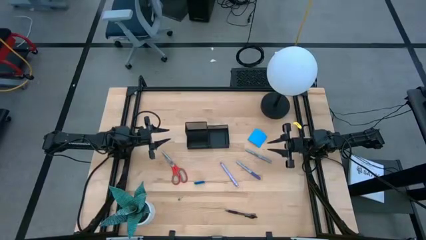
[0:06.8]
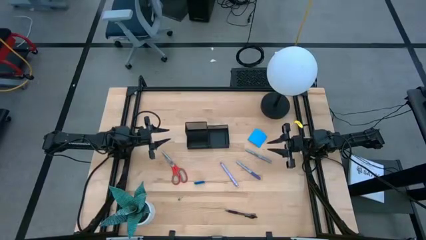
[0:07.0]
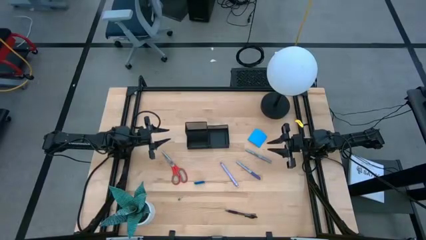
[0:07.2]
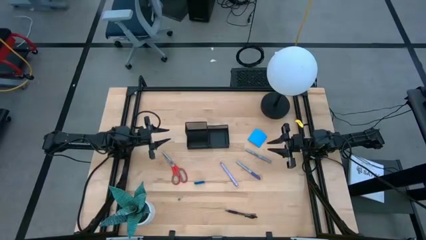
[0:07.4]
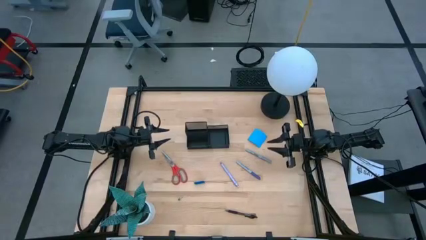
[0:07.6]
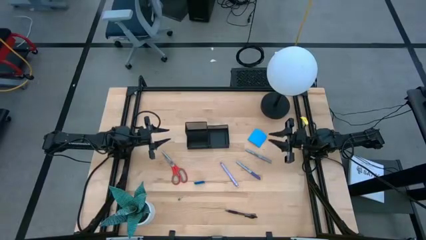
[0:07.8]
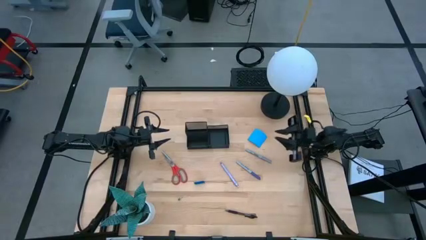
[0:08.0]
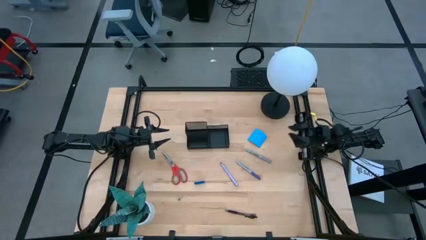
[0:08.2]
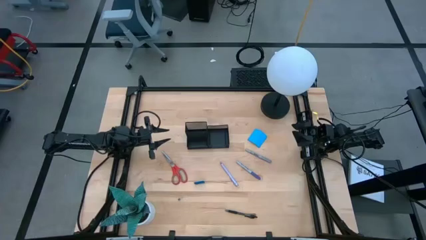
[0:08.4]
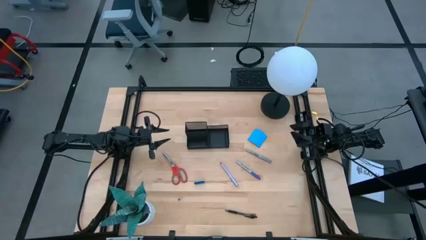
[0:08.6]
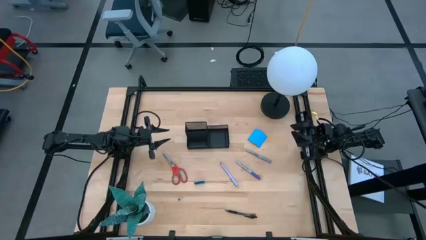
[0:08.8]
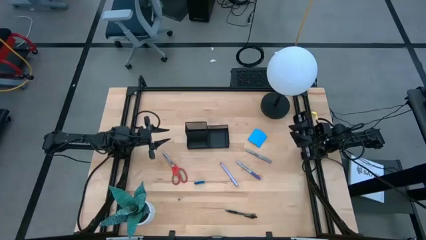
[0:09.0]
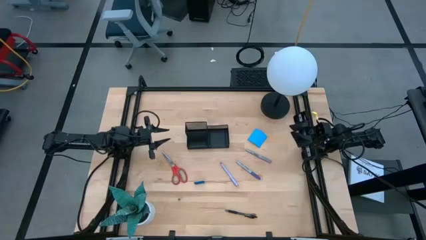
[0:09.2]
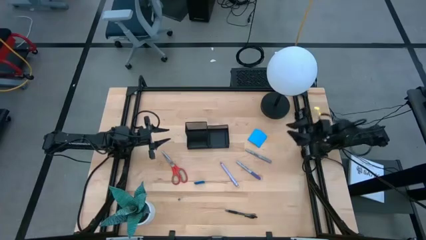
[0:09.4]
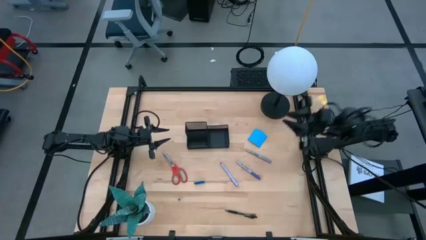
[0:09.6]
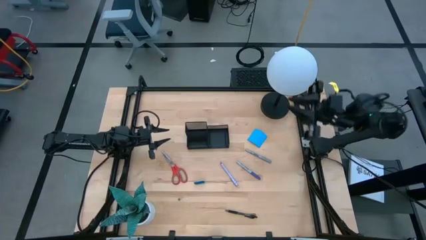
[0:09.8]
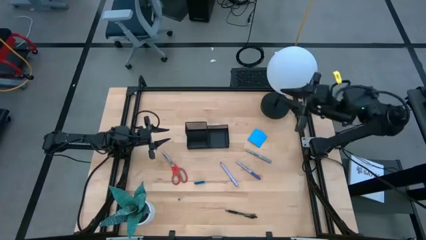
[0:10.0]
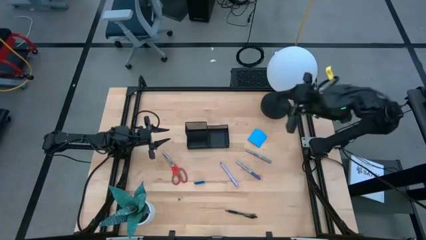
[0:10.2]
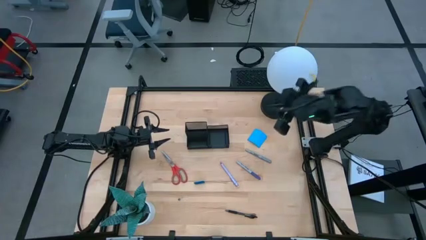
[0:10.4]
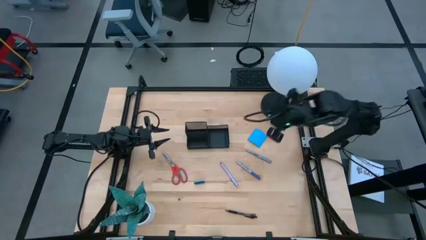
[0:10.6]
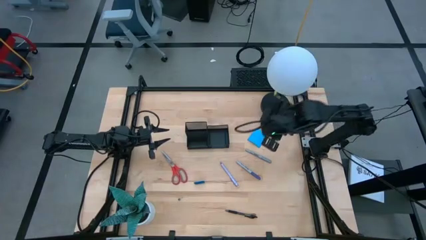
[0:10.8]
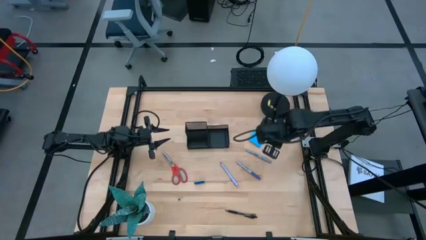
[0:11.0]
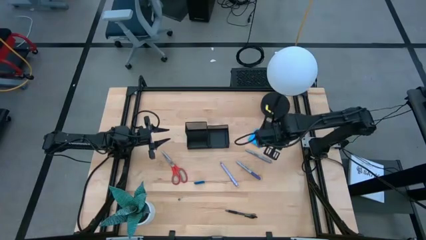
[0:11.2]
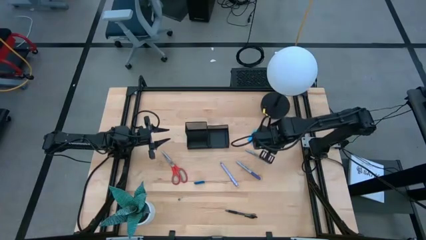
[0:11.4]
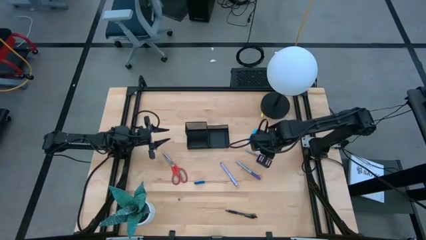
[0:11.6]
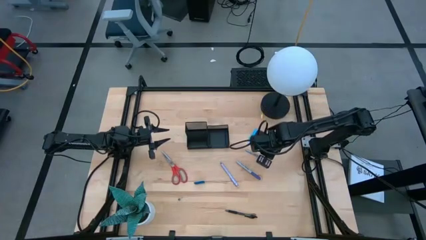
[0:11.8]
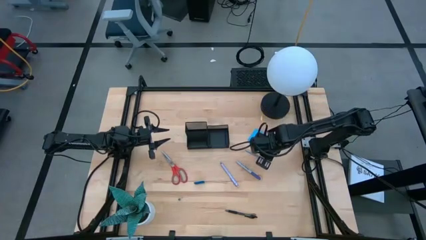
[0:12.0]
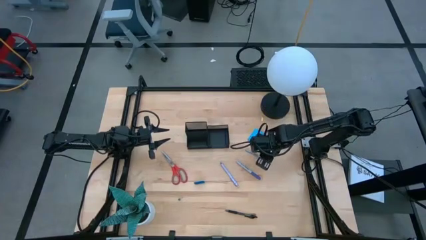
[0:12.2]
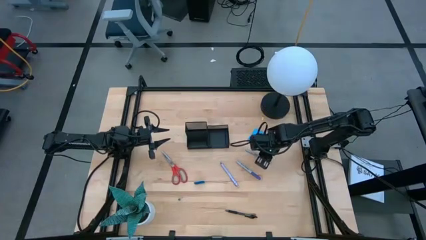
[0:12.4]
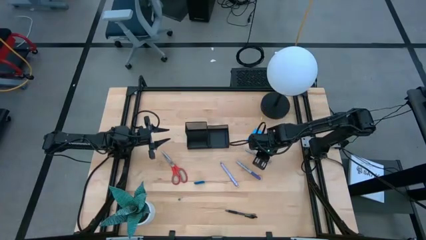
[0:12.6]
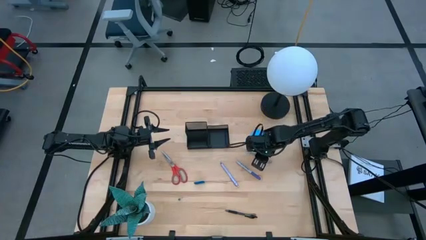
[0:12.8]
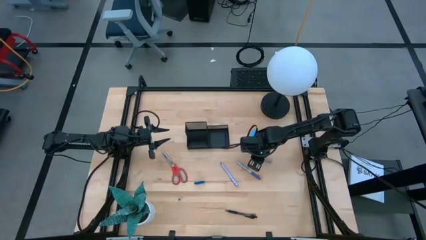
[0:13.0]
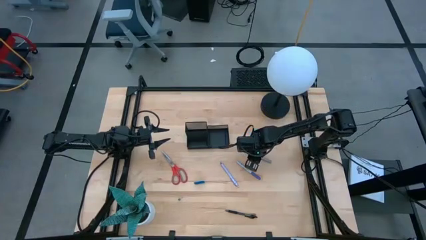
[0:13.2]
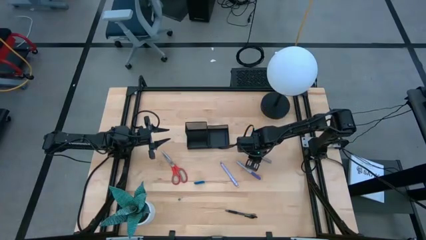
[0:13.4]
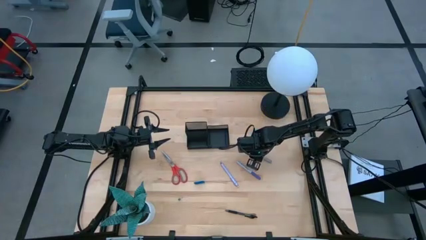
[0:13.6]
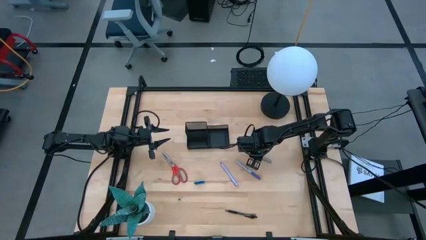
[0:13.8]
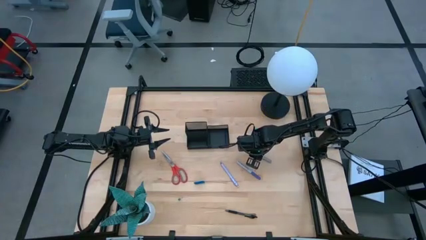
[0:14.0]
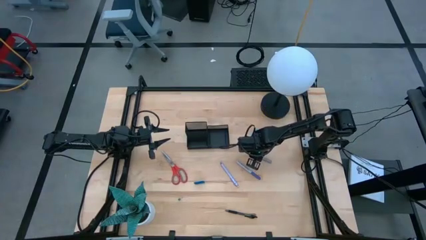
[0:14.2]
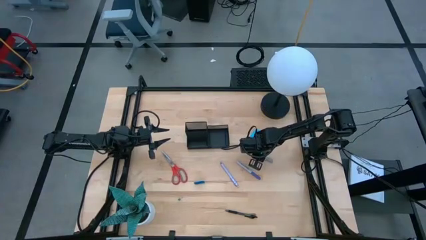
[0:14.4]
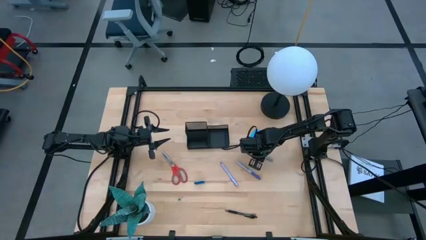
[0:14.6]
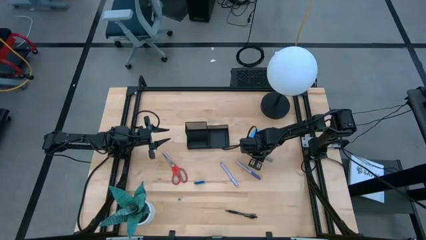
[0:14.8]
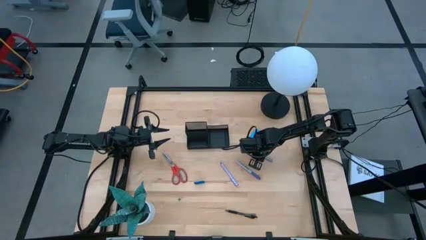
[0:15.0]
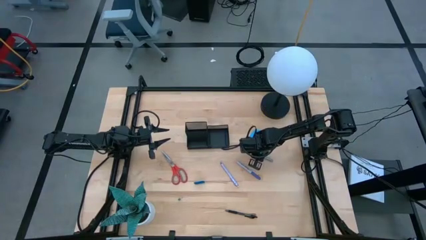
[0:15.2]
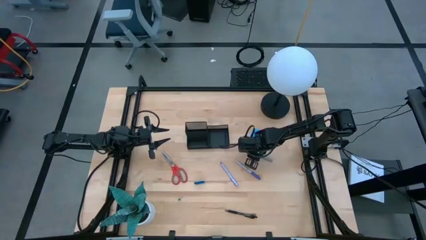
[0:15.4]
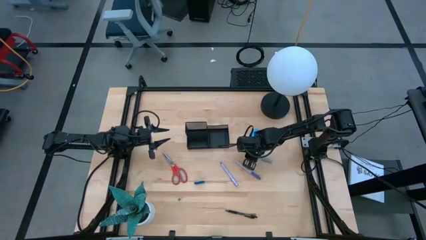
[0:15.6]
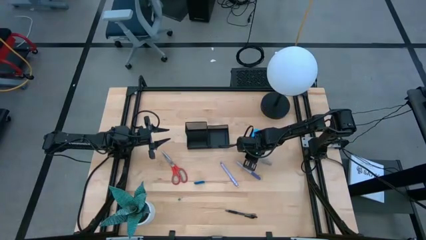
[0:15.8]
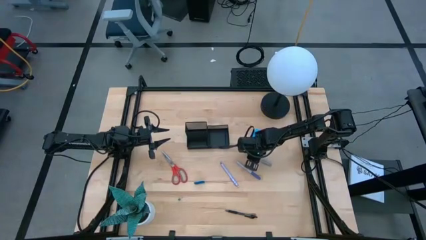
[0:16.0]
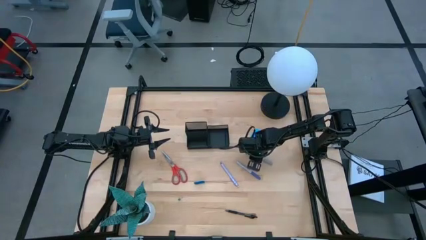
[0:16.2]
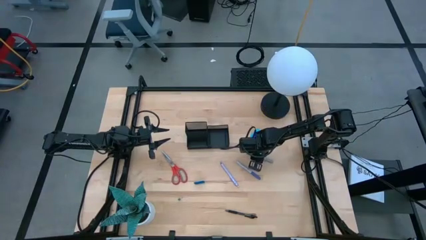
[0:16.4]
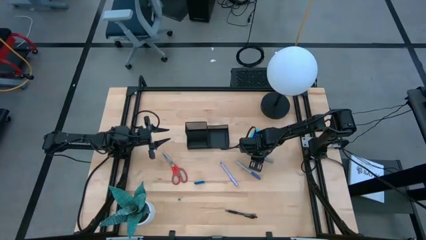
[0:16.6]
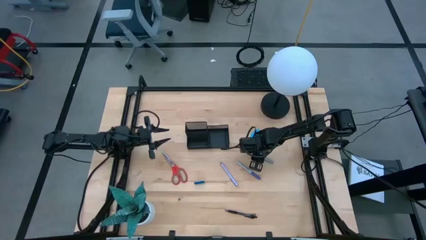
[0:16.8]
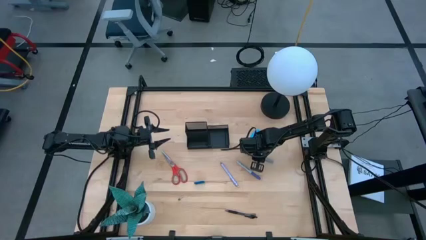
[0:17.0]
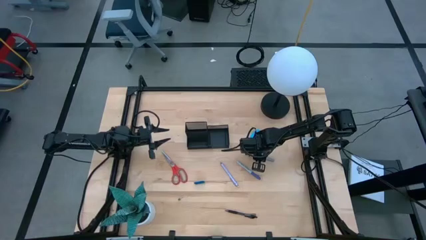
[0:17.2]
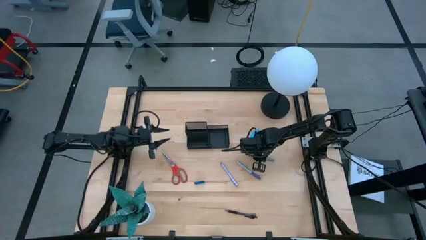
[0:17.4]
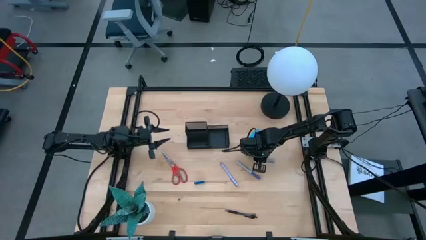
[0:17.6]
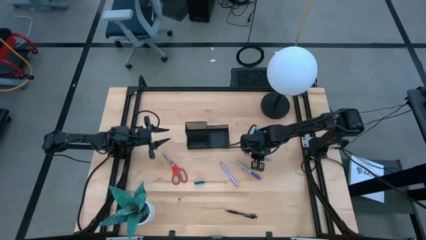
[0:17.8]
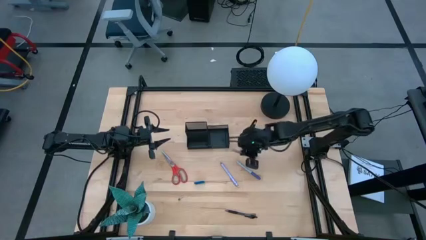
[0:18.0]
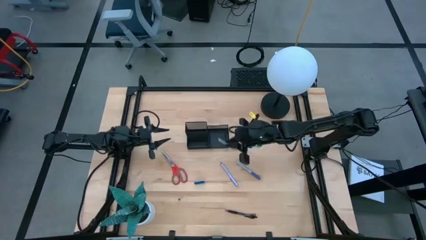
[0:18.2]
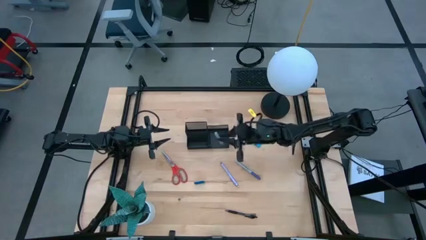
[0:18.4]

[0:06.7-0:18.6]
Task: Pick and place office supplies into organizer
Put the gray marker pen into the desk organizer

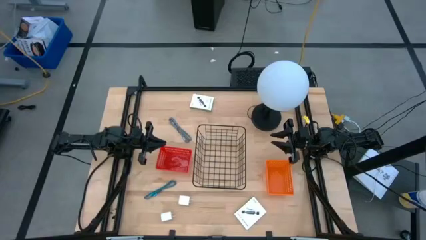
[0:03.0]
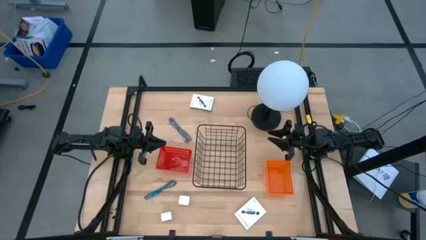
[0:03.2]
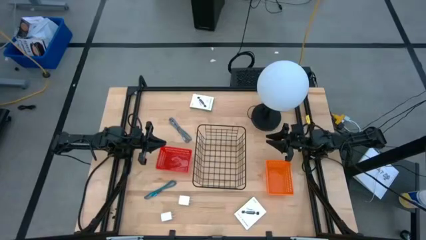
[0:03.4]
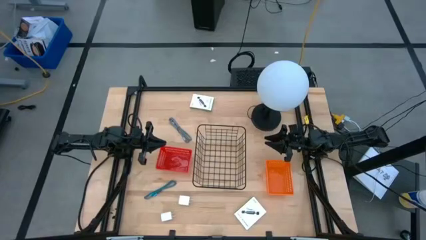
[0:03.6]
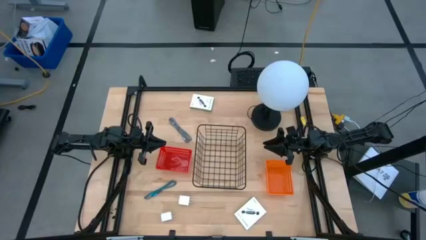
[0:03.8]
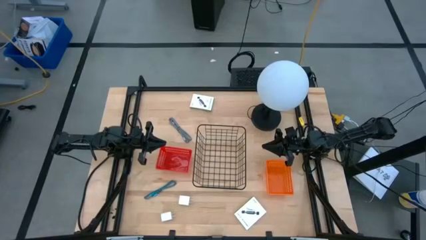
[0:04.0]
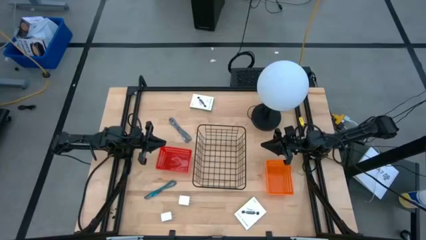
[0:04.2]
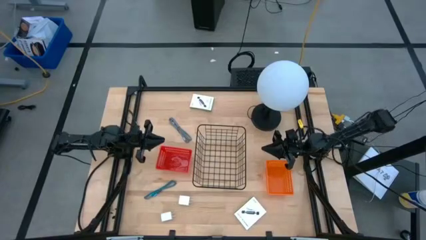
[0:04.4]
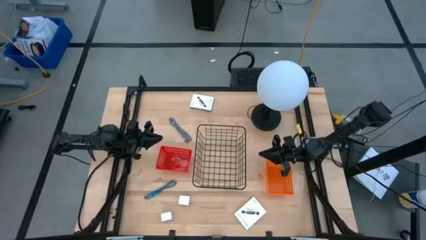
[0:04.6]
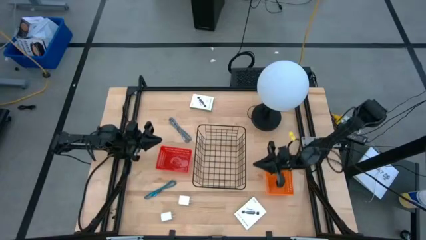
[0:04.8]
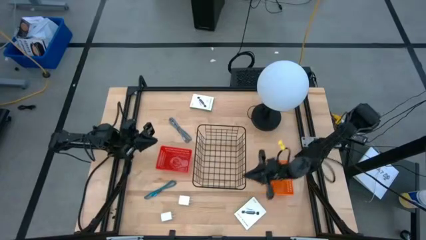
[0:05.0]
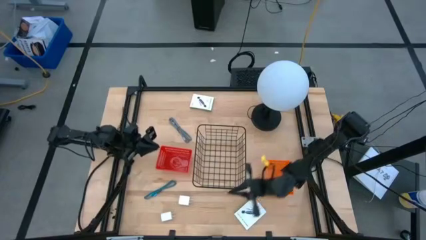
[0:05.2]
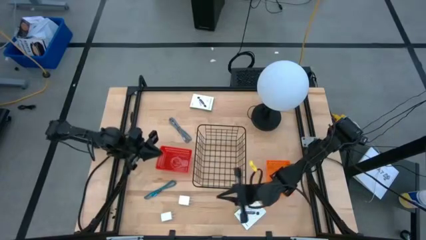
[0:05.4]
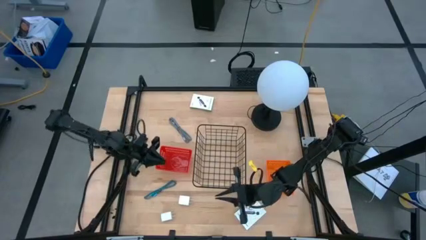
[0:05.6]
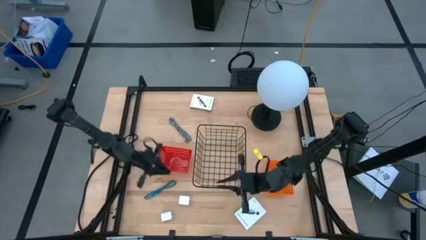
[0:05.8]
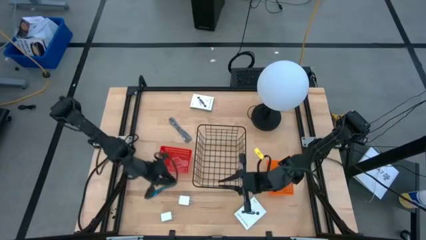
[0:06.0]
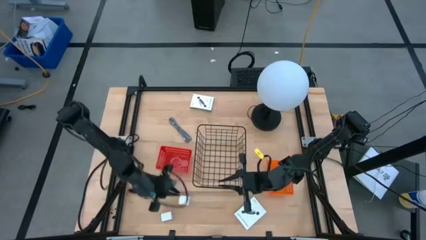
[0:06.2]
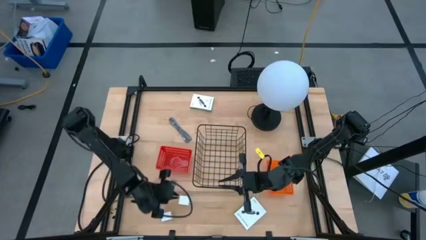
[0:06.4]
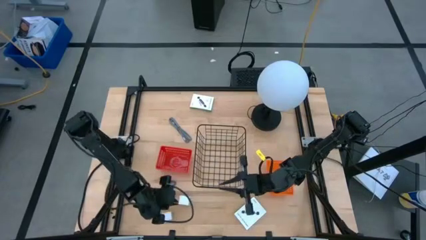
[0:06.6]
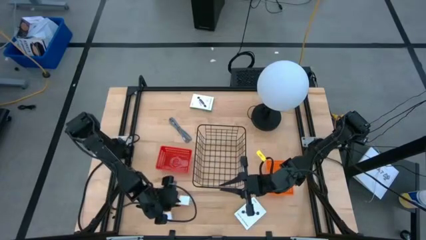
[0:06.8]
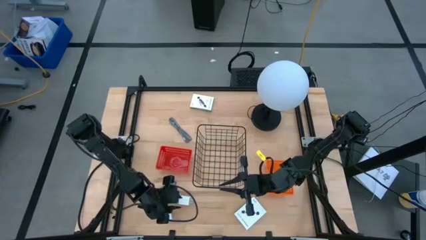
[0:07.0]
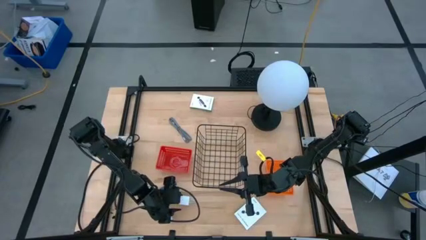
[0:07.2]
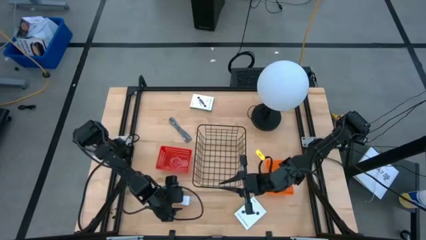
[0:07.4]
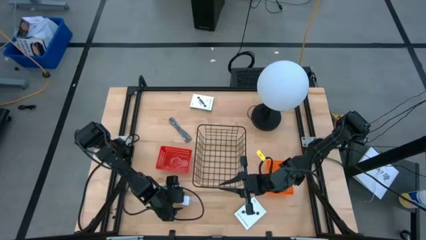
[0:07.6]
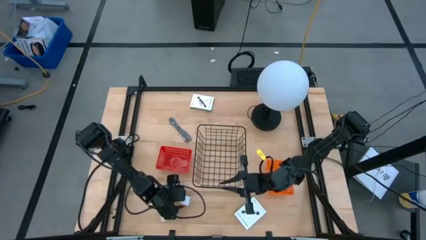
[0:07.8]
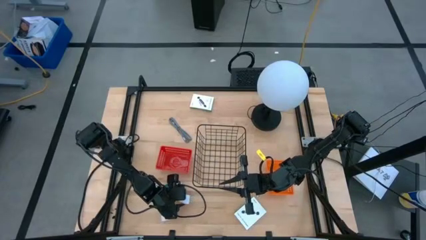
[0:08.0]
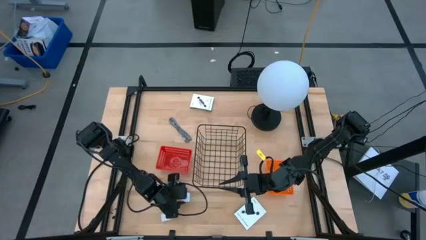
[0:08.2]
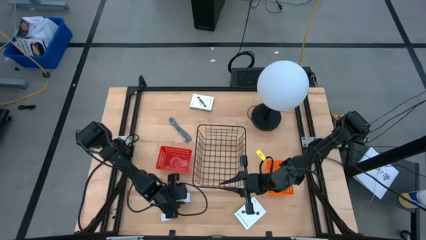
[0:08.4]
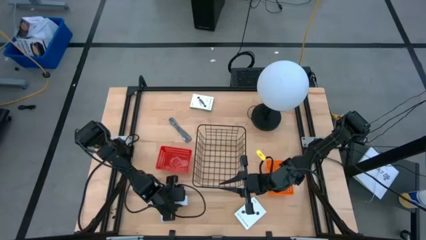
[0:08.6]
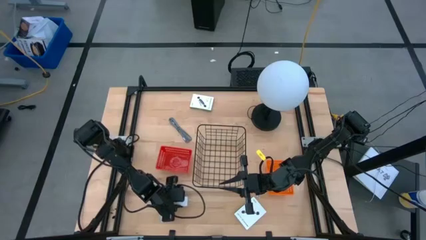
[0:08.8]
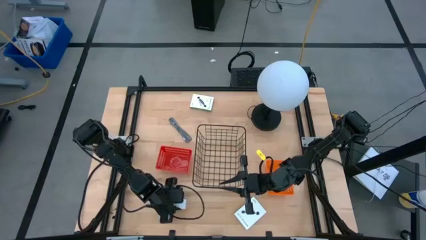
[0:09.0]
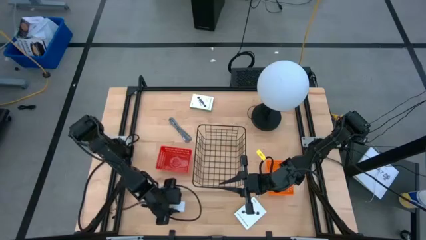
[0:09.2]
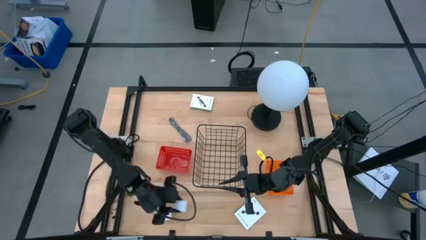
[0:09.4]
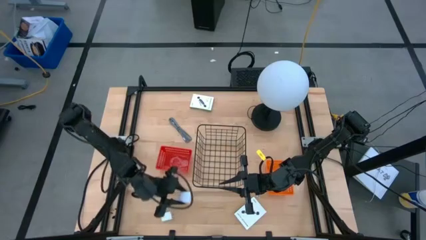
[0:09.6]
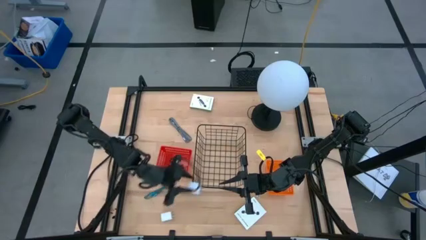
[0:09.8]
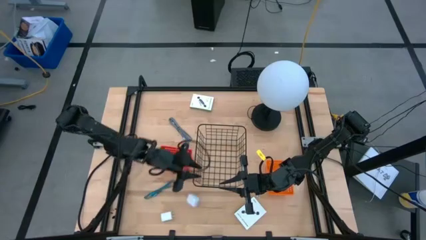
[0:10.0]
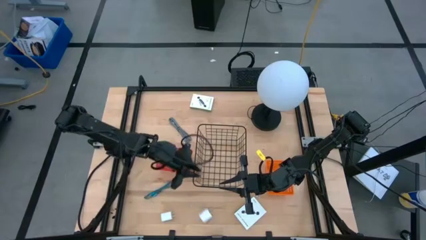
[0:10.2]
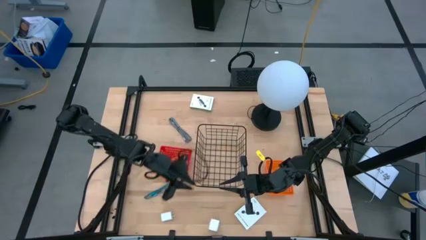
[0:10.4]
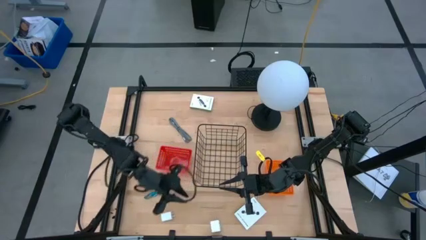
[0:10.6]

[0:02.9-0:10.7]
Task: Pick and place items into bin
Put the right charger adapter into the black wire basket
